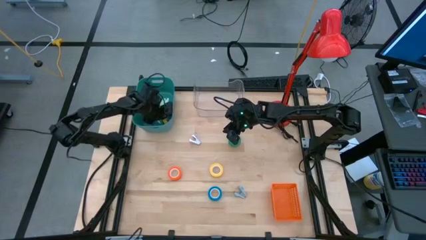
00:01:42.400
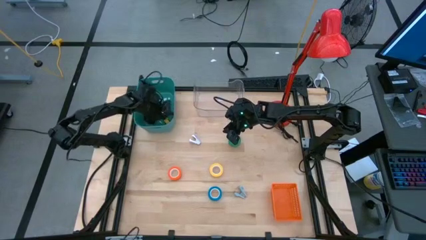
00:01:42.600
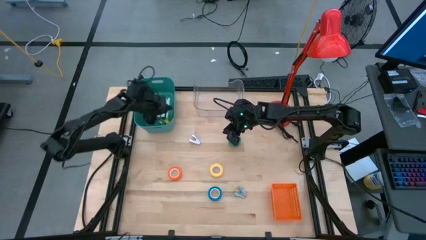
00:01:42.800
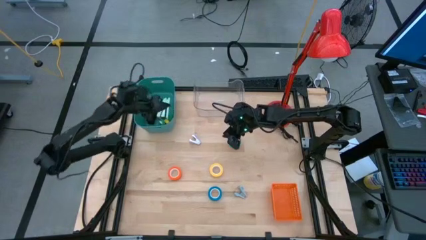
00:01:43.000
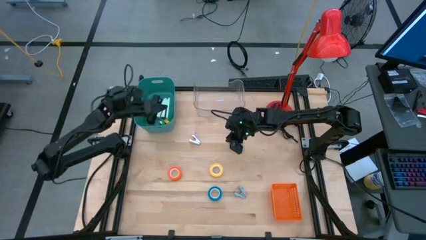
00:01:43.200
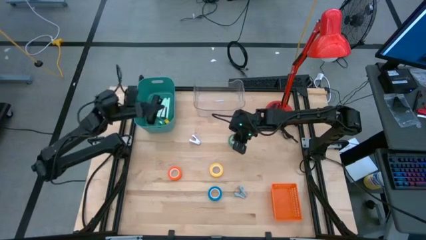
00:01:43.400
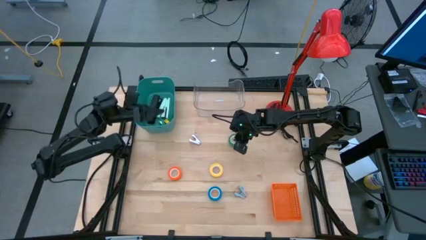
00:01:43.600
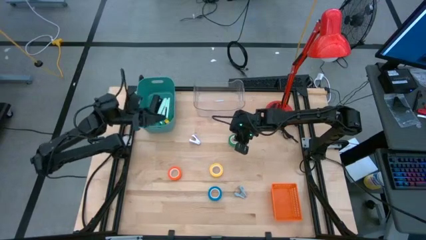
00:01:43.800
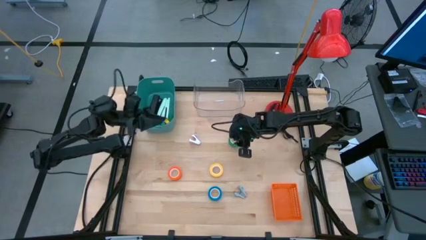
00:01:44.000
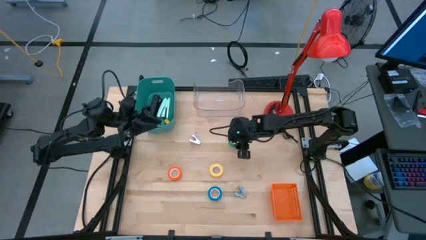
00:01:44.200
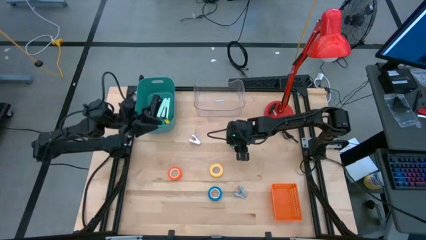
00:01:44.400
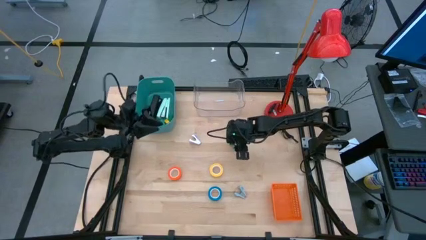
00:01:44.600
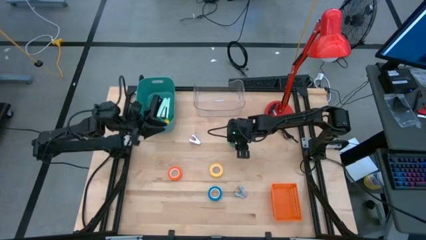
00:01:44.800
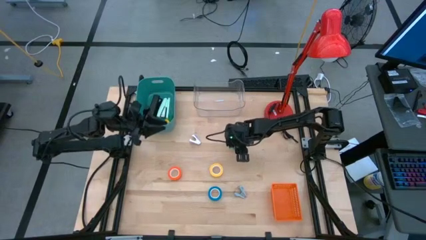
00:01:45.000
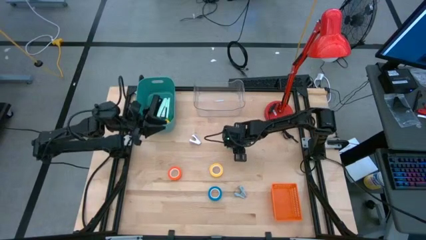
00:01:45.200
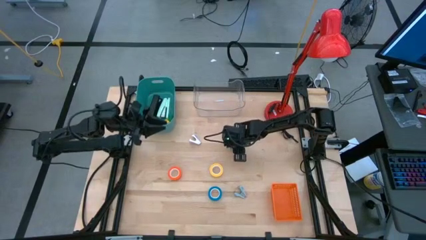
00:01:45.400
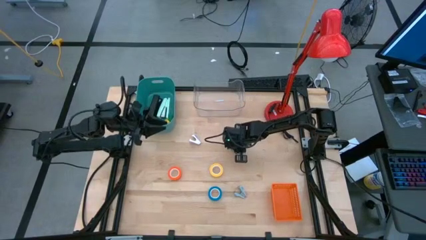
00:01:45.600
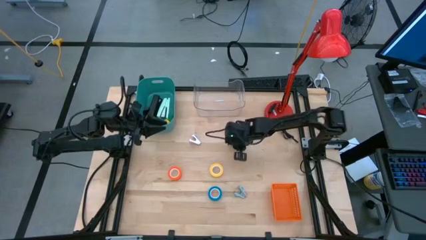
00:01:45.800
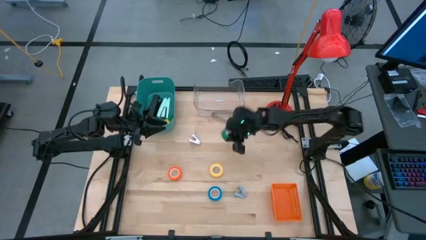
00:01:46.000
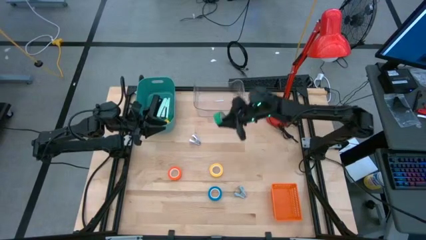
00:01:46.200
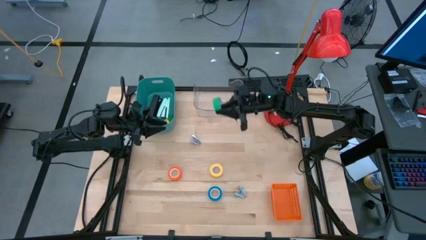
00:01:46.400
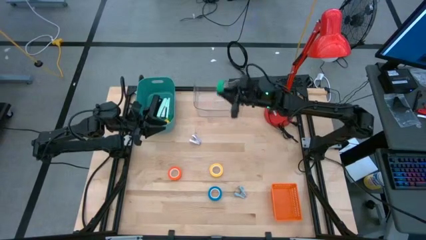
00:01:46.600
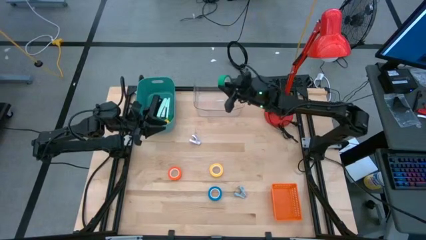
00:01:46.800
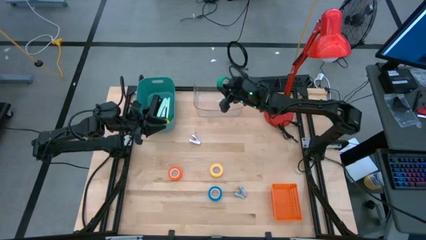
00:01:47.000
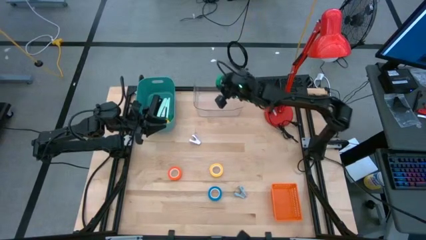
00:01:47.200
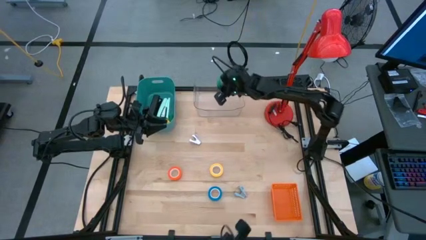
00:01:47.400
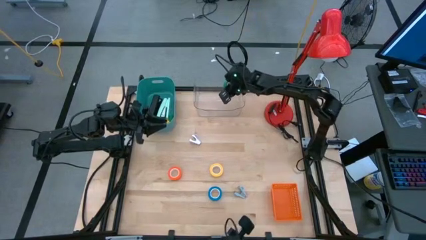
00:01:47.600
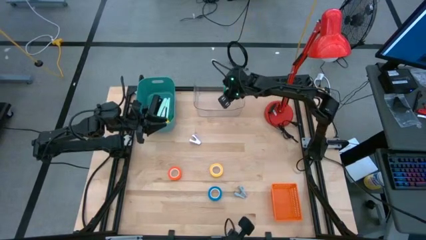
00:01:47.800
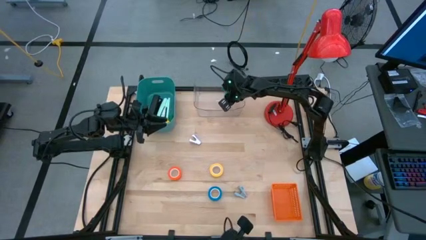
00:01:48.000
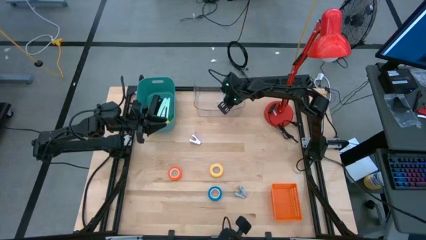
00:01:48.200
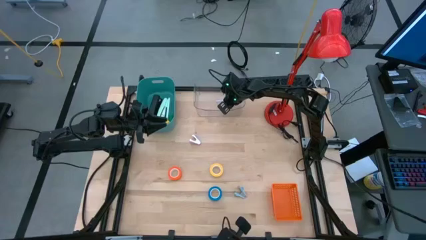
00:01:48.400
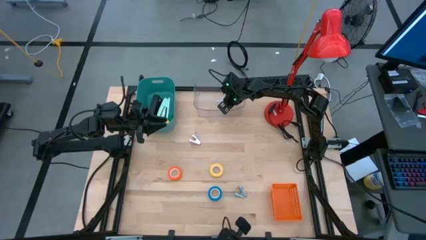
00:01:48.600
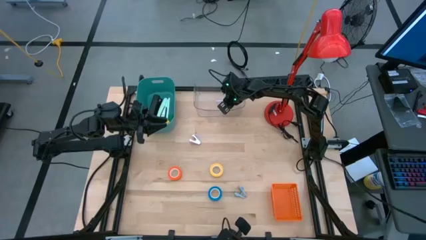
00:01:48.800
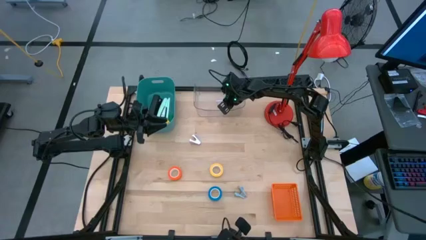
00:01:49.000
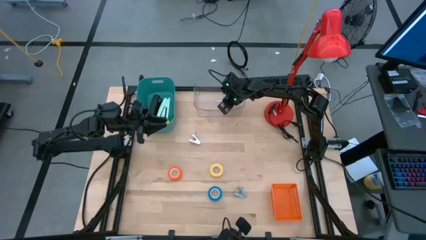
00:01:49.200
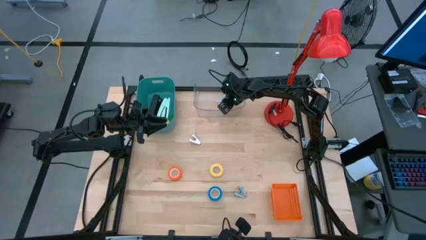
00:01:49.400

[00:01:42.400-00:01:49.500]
Task: Pick and place Stapler, Stapler remover, tape
Put the green tape into the transparent bin

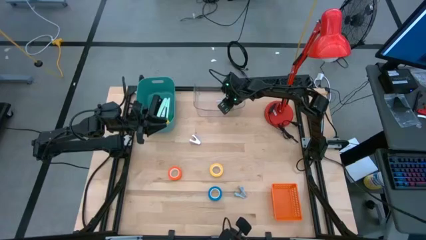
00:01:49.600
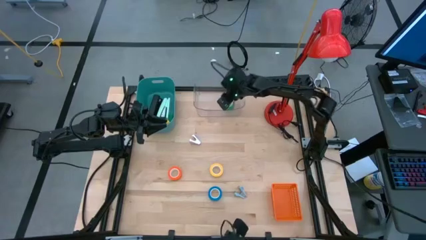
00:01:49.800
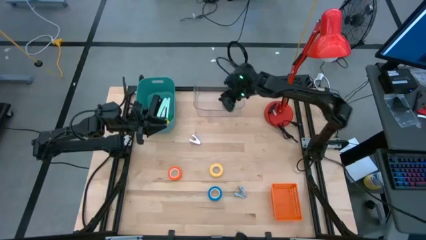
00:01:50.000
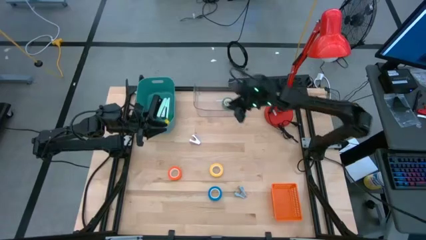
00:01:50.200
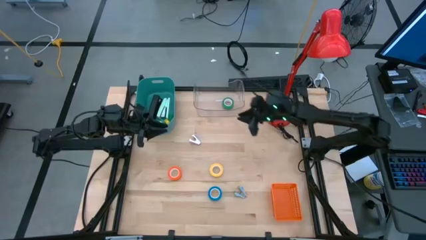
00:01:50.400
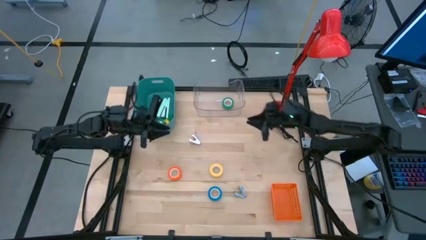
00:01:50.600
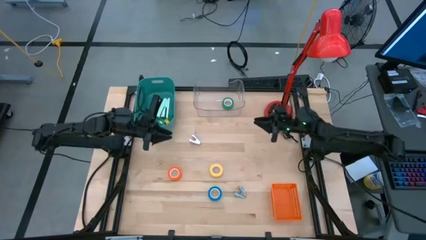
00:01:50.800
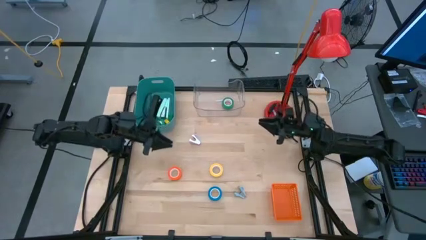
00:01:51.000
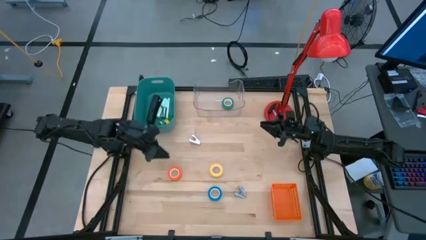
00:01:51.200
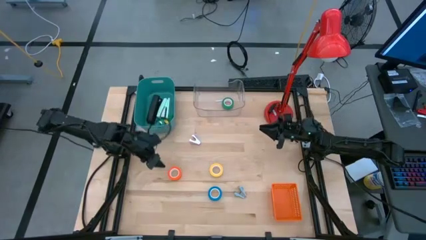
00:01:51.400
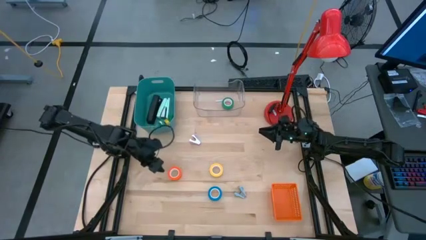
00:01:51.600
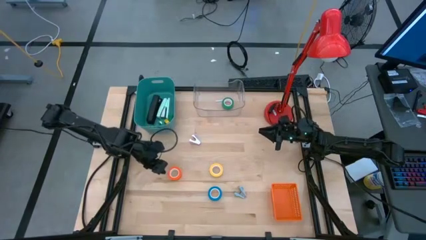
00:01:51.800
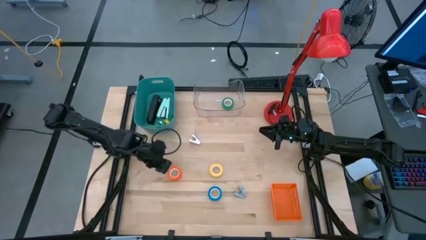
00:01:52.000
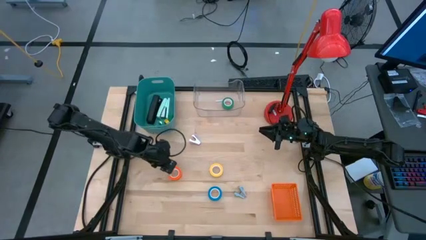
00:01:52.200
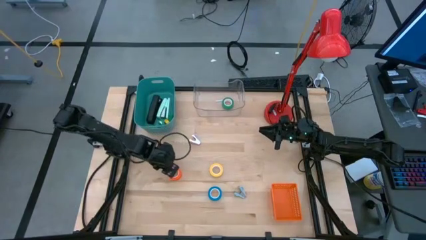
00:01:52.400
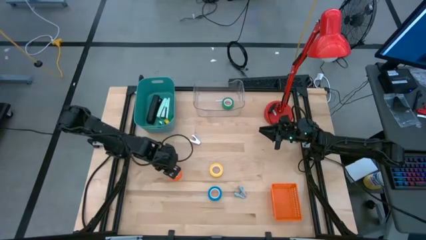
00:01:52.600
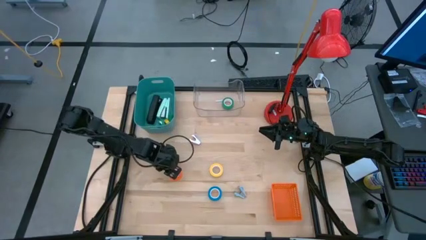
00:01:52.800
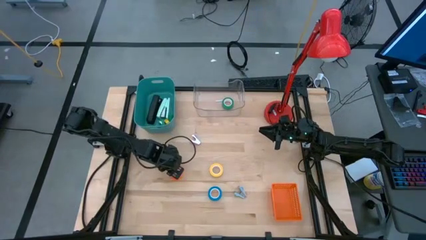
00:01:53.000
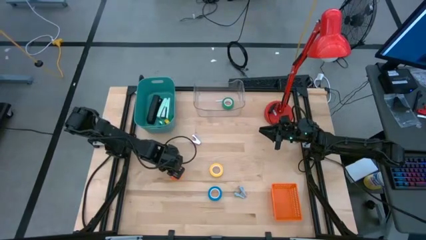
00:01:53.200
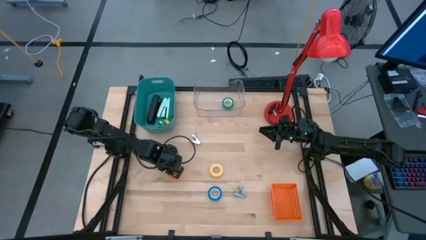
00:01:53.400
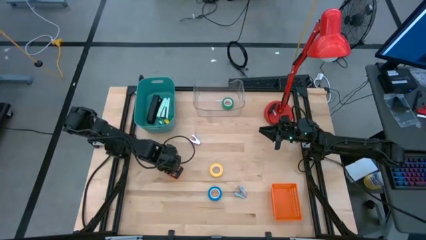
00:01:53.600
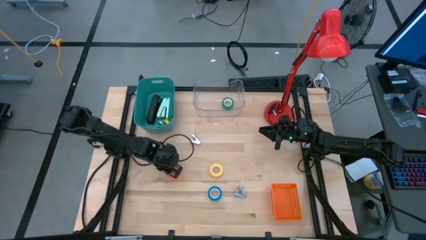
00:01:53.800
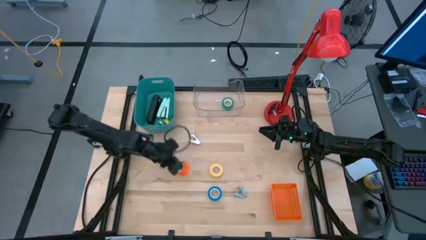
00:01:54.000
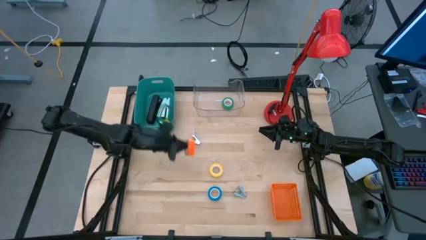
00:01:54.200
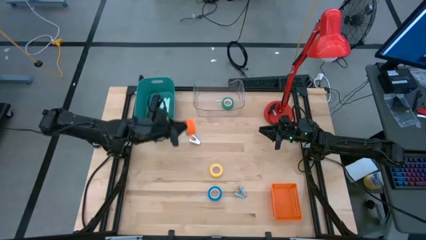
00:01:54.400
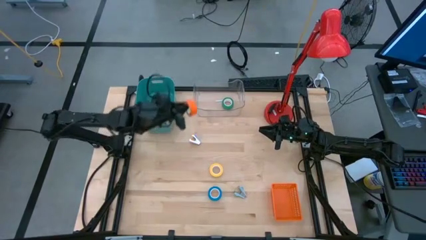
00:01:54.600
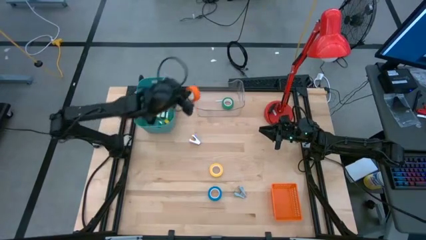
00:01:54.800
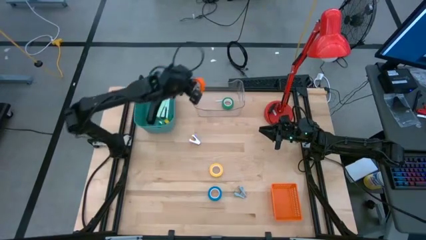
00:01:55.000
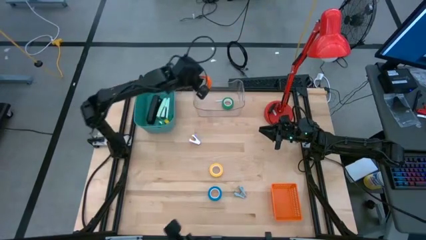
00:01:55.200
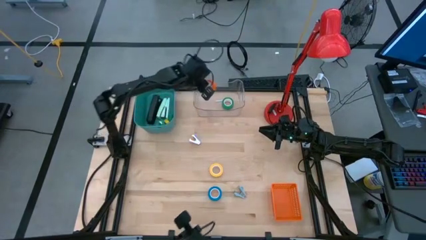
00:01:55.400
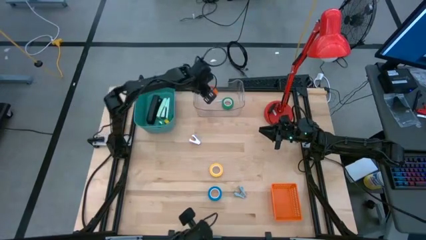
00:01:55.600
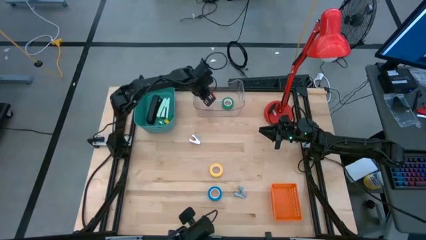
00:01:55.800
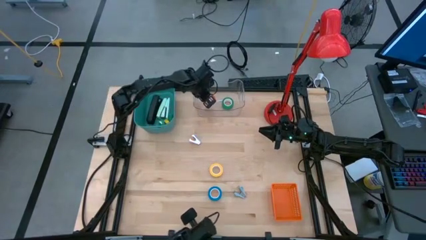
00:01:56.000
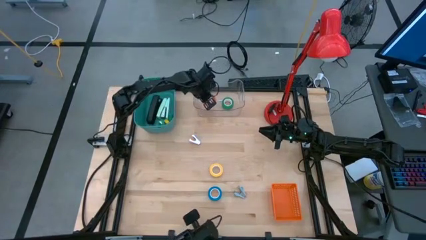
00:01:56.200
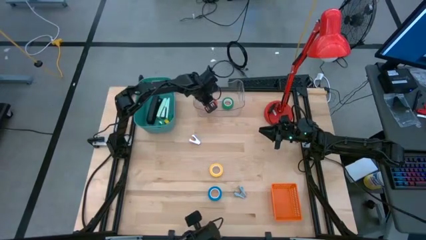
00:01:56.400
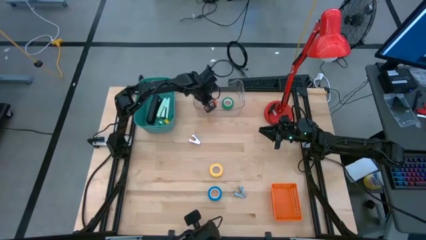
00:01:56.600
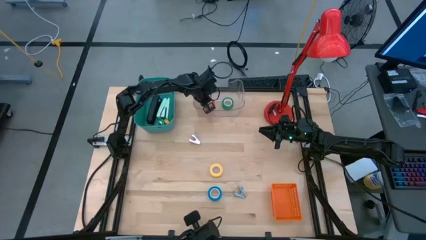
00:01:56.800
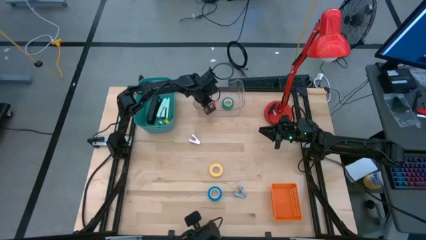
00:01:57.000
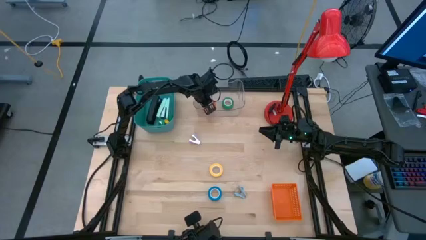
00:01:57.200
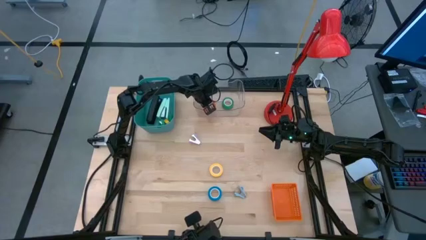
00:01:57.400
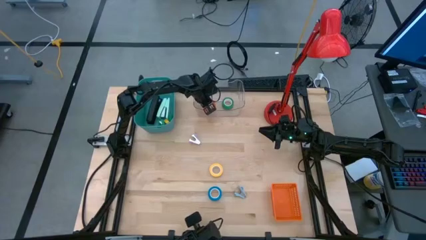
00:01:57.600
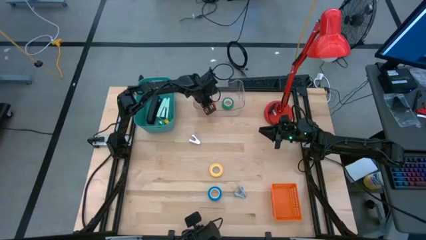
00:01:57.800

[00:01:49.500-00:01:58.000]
Put the orange tape into the transparent bin

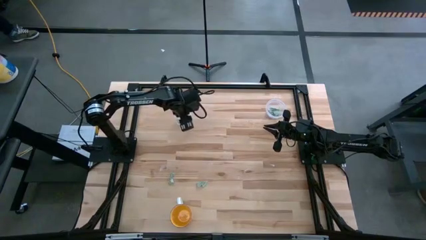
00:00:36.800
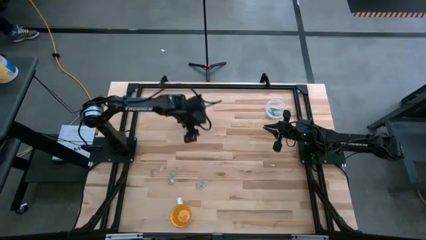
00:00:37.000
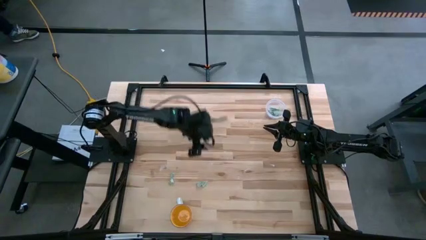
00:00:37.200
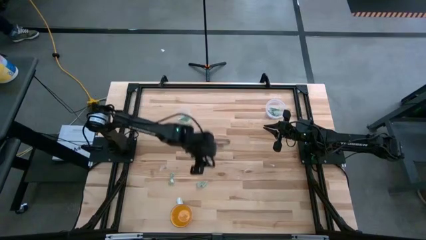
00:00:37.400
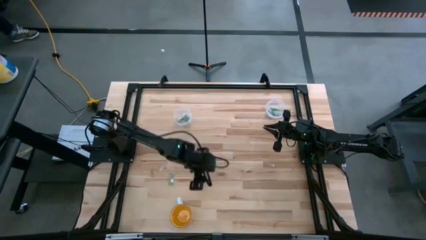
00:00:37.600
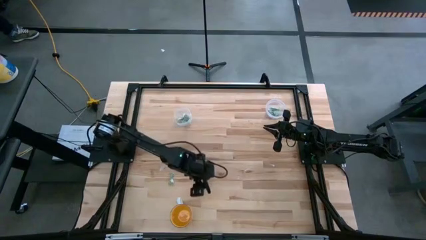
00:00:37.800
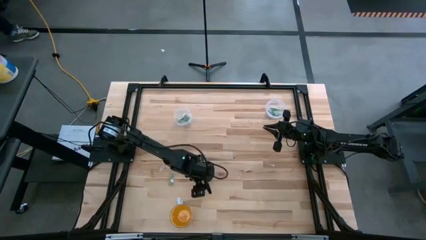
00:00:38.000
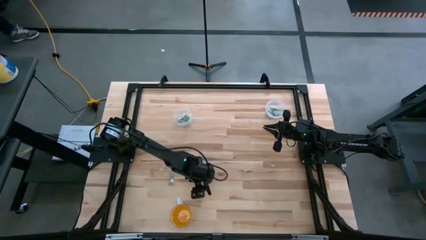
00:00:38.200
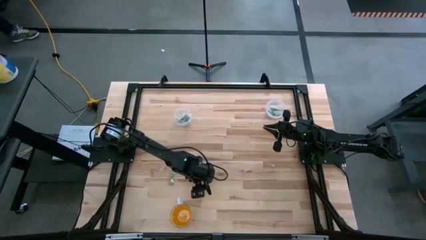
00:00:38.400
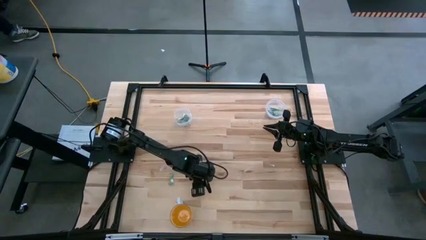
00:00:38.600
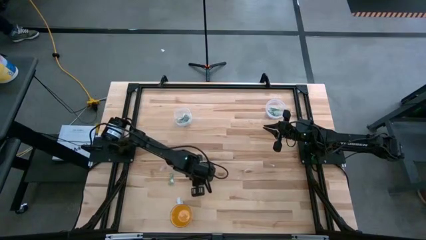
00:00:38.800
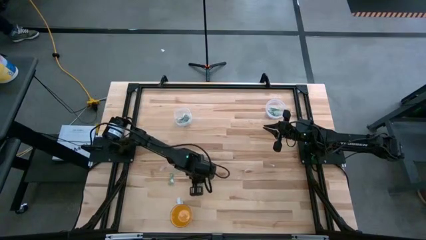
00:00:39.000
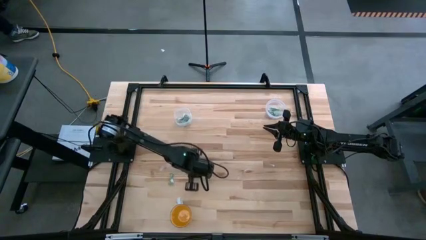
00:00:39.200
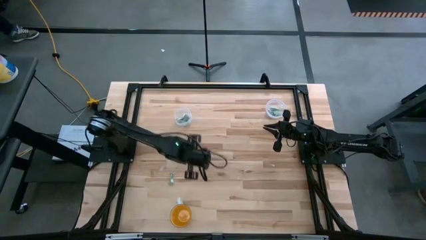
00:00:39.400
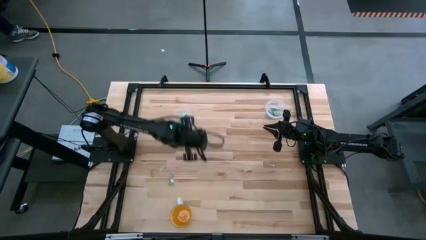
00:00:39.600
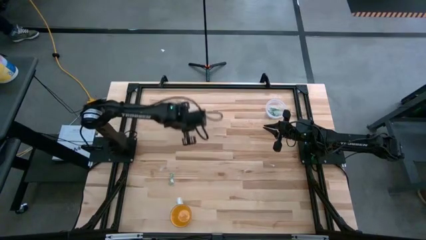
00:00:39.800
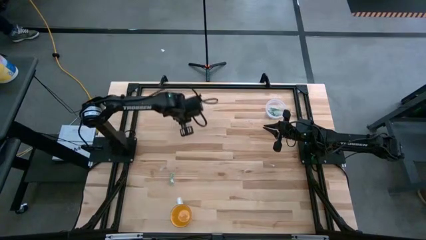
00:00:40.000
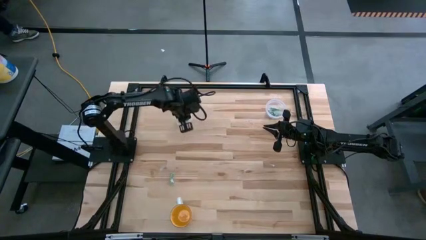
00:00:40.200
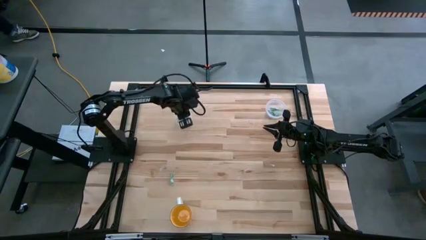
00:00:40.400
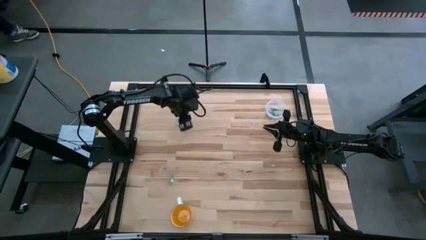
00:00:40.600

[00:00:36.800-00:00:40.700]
Task: Pick and place items into bin
Put the stevia packet into the left transparent bin
